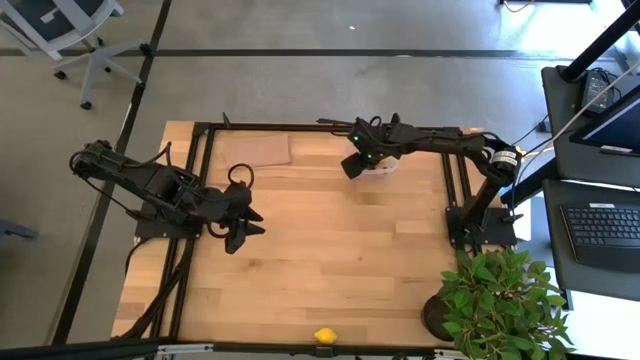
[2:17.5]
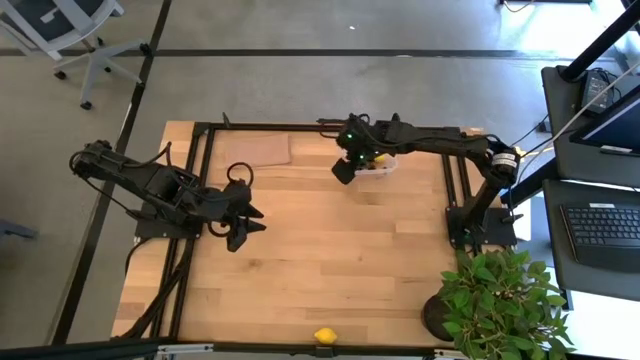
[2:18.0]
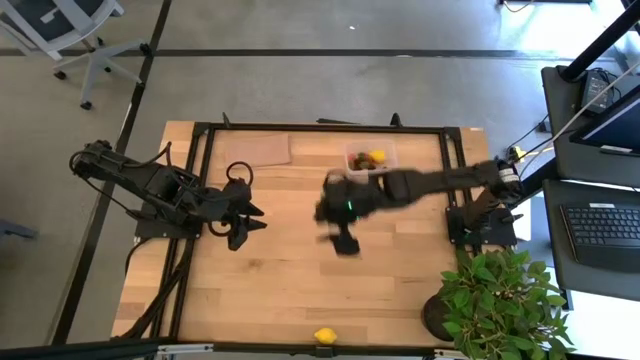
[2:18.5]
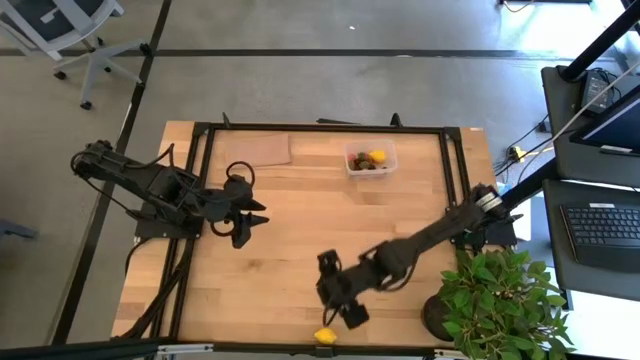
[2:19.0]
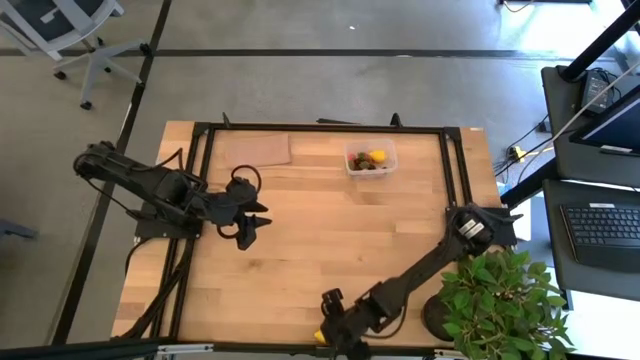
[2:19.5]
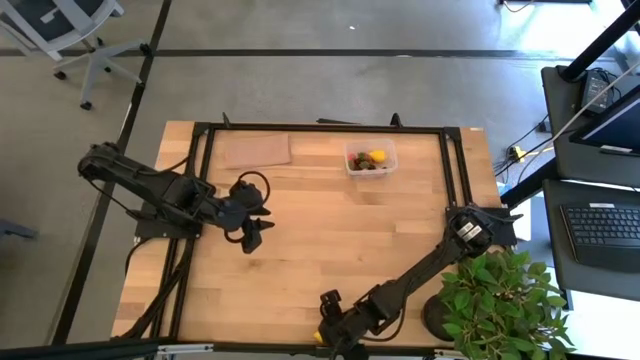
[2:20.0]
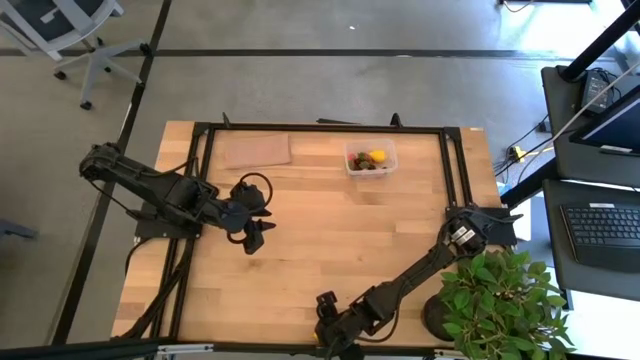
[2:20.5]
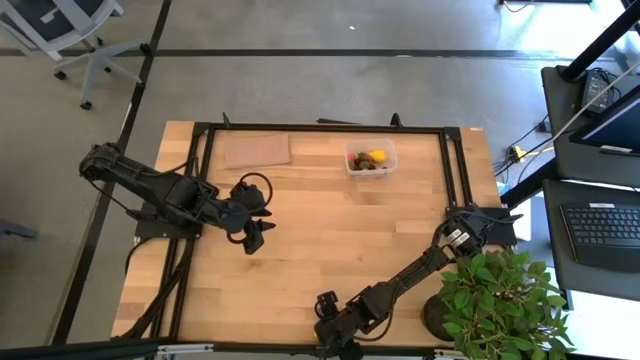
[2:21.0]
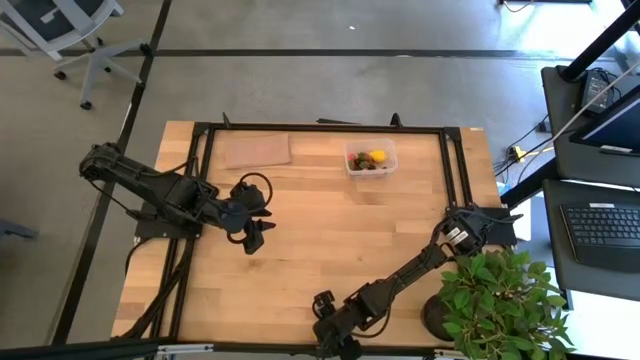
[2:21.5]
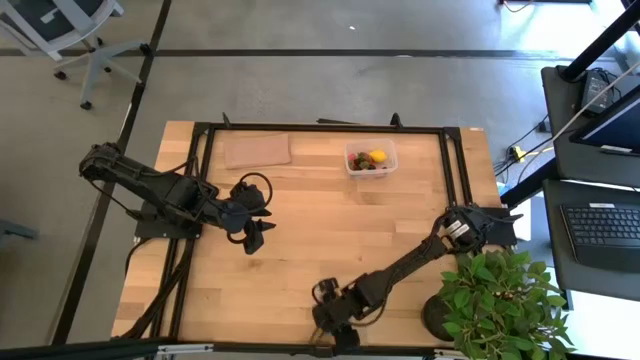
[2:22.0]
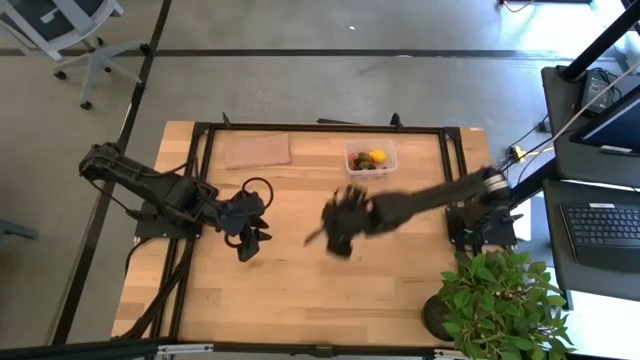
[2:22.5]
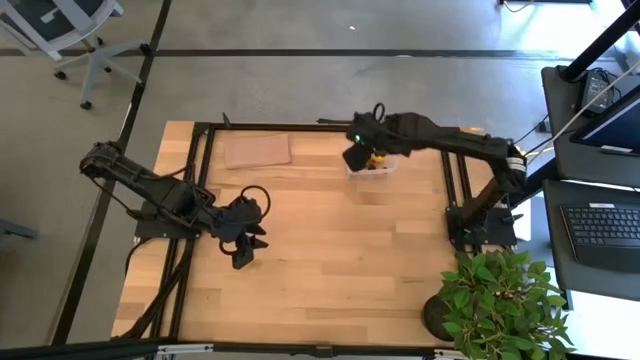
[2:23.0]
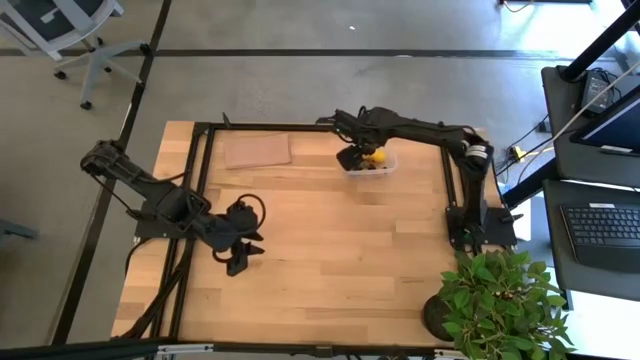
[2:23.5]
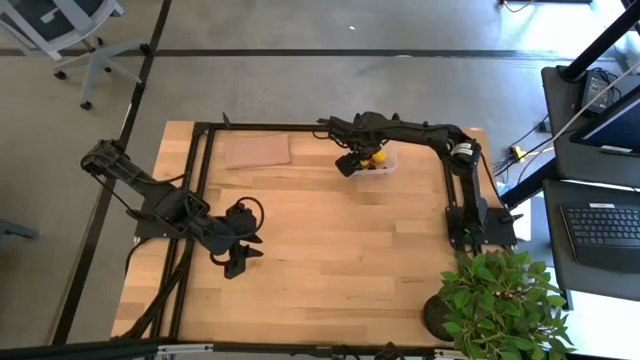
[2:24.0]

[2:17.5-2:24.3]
Task: Pick and placing Produce into tupperware
Put the lemon into the transparent bin

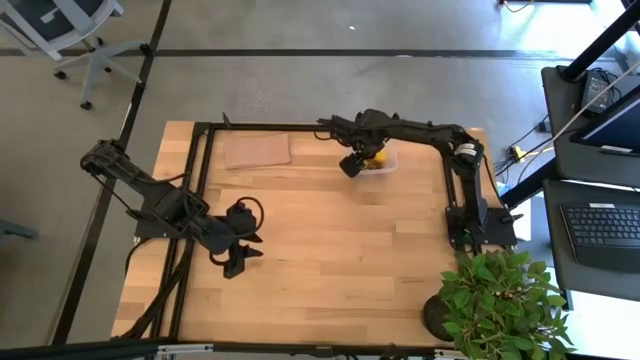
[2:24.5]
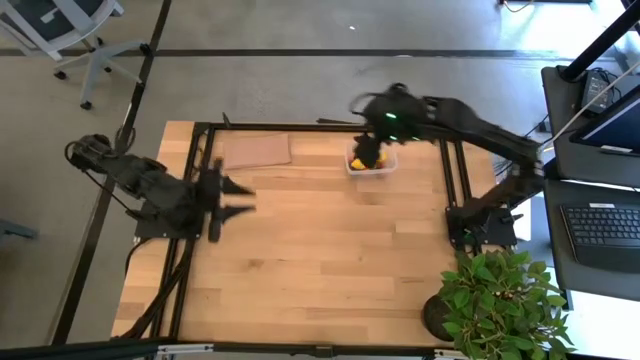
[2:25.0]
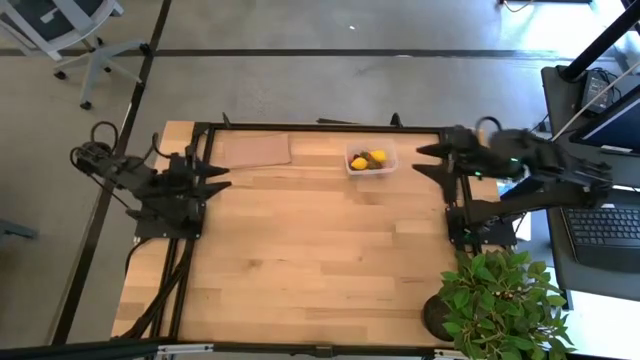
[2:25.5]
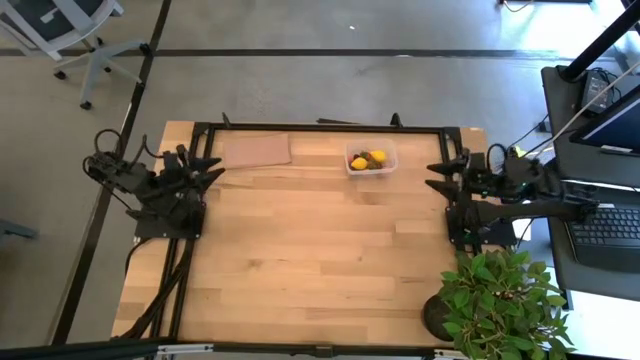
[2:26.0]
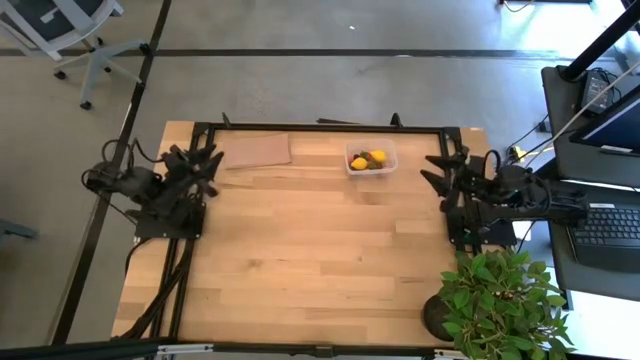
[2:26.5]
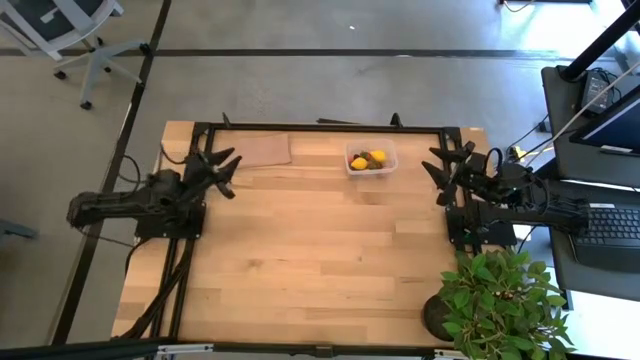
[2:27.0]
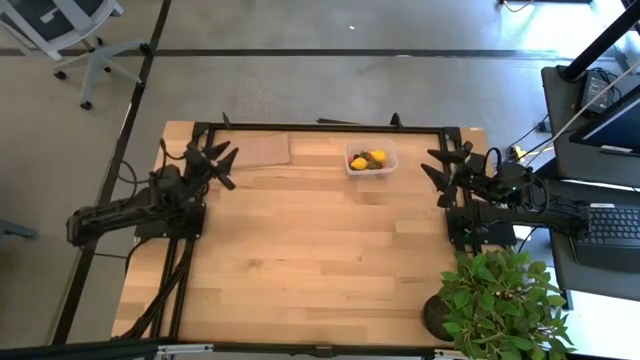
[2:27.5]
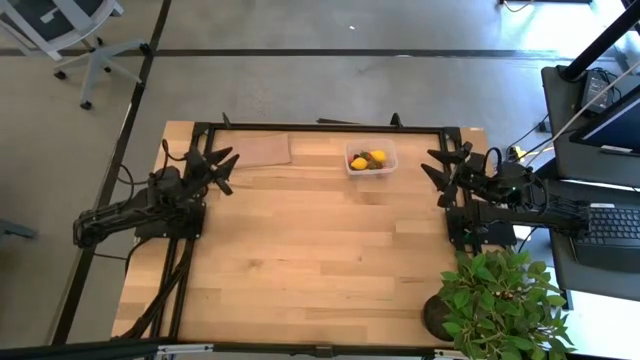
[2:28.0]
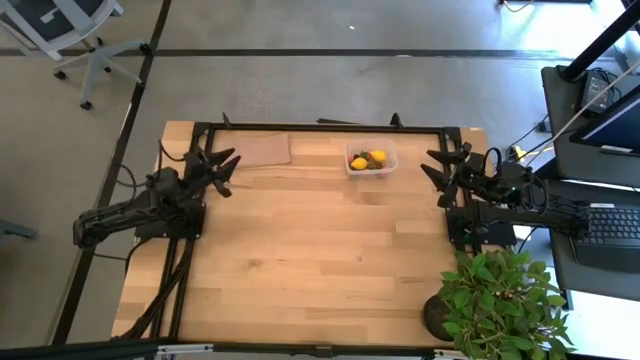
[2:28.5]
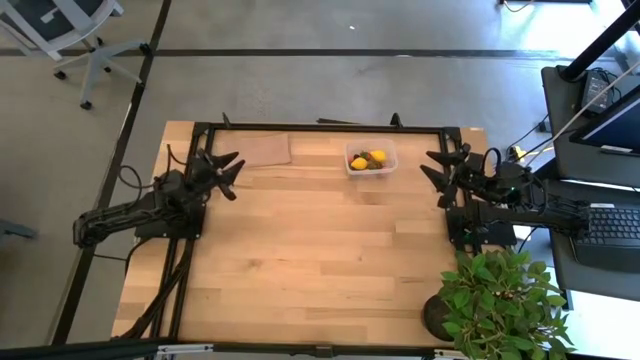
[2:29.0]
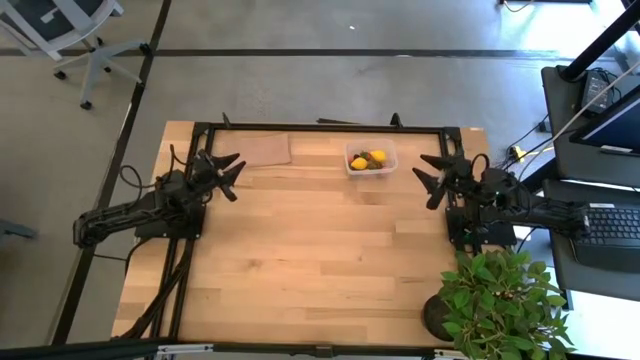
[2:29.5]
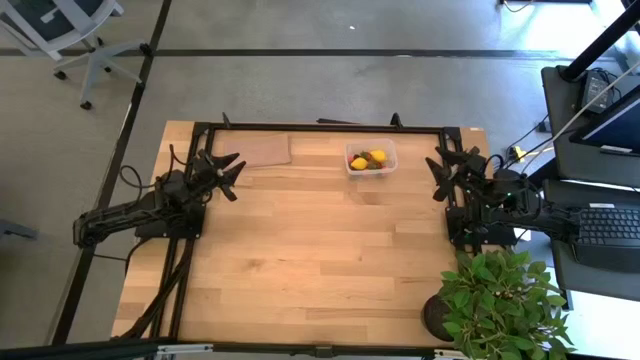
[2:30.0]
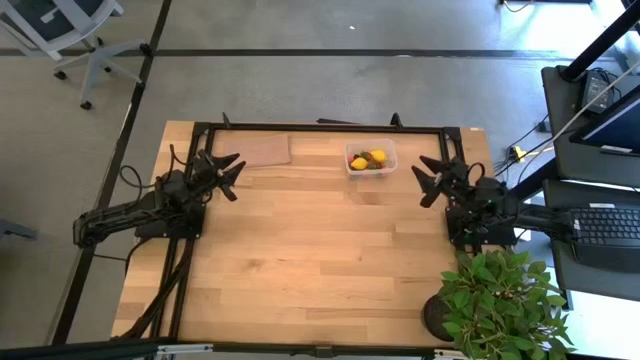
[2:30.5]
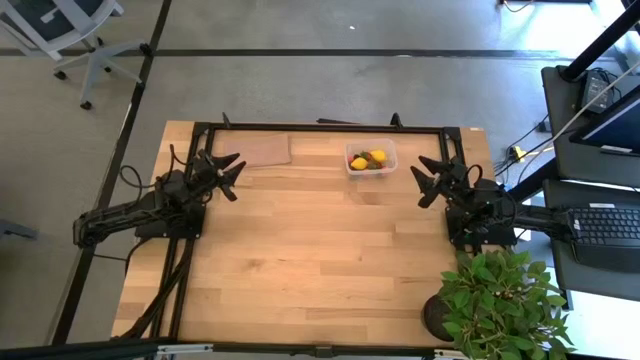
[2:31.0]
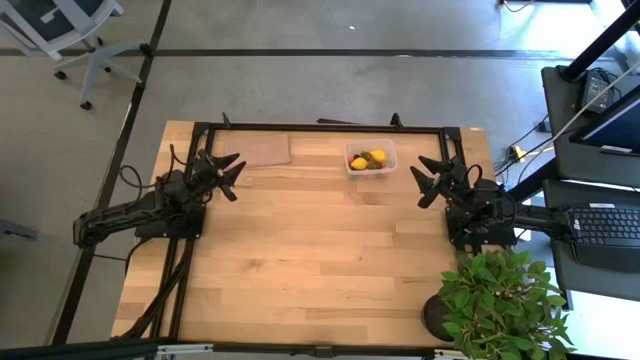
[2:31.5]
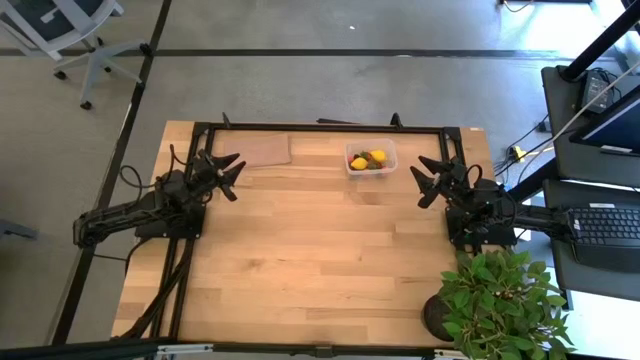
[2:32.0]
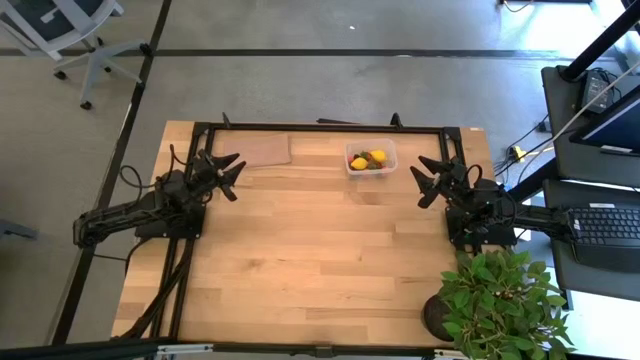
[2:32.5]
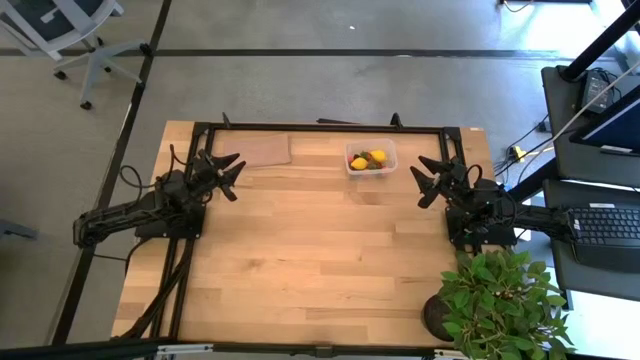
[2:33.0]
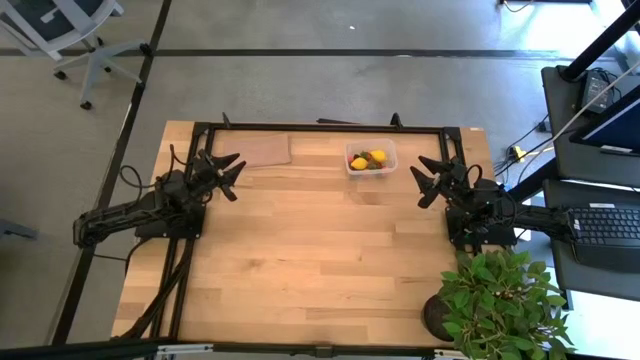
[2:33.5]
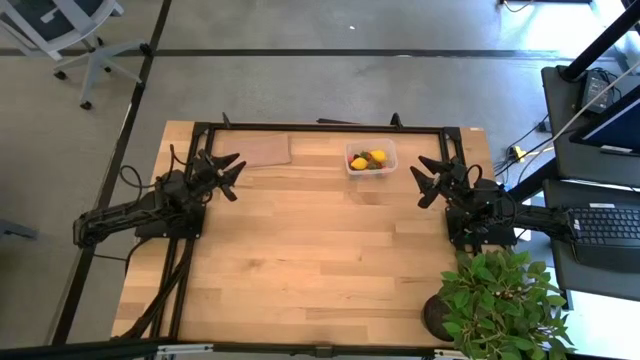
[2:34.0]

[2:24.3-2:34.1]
Return to Home Position

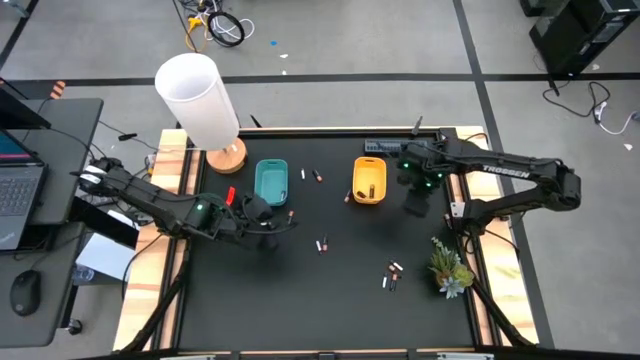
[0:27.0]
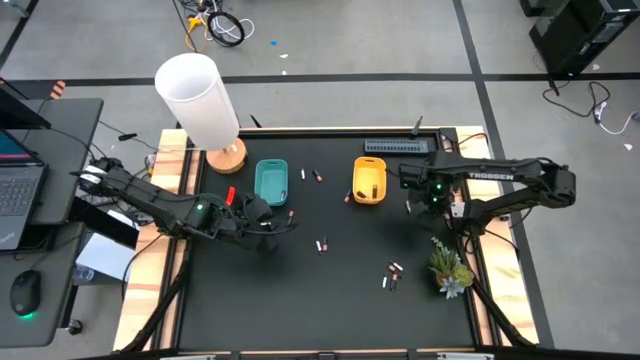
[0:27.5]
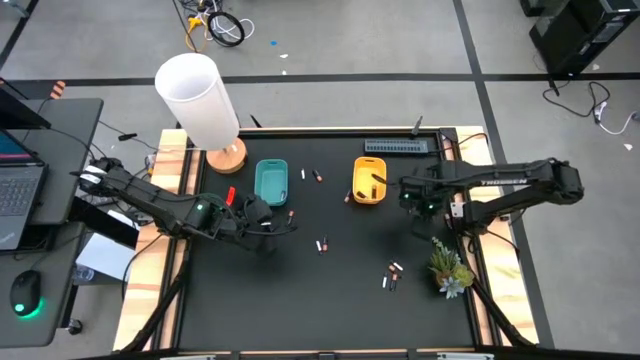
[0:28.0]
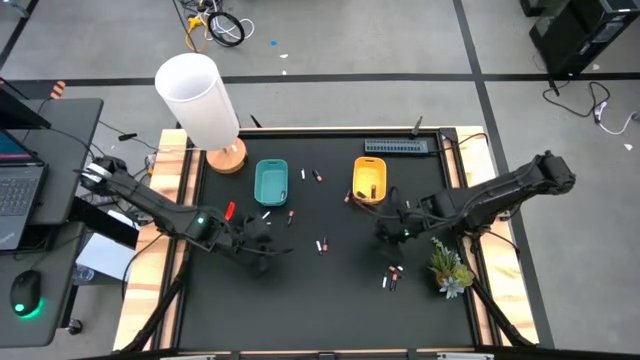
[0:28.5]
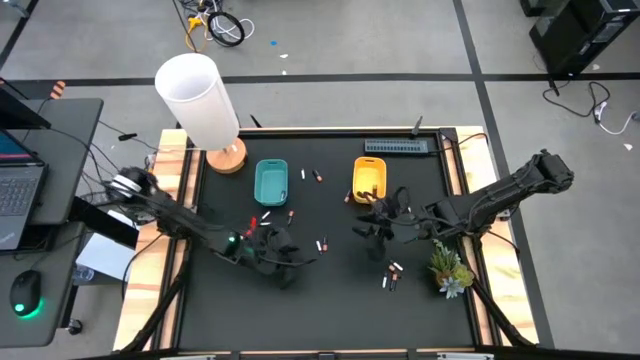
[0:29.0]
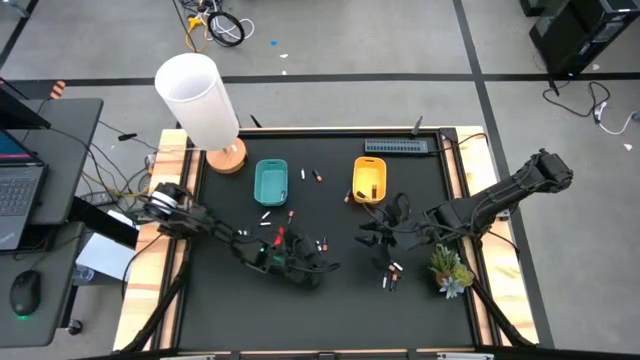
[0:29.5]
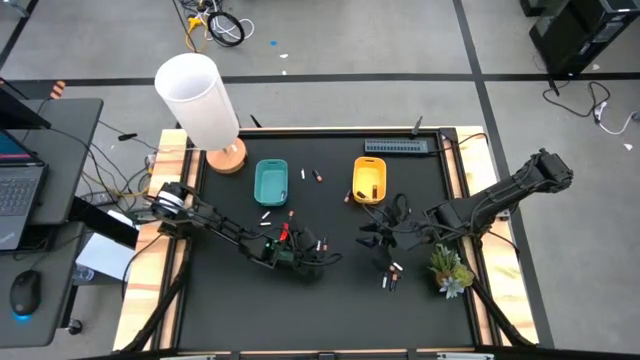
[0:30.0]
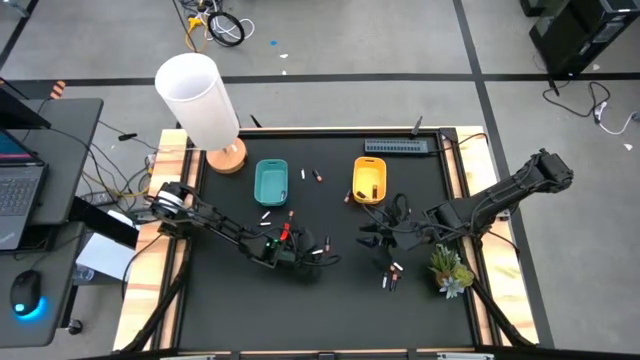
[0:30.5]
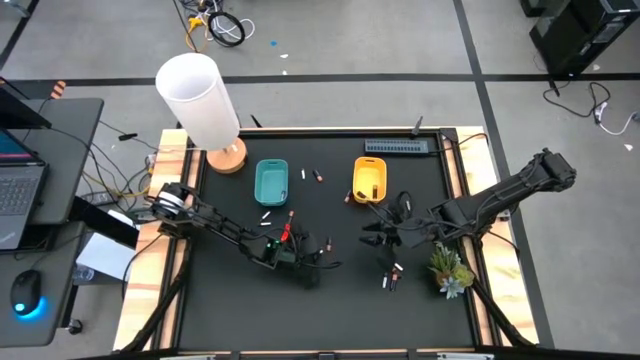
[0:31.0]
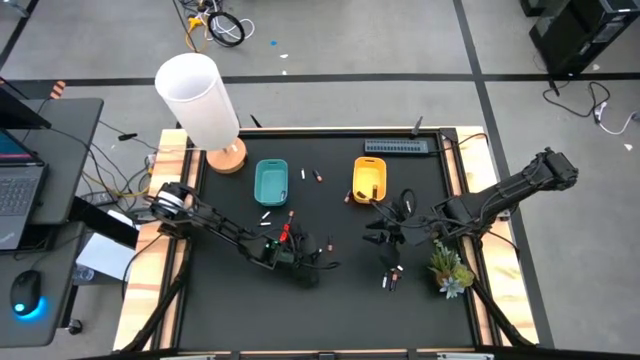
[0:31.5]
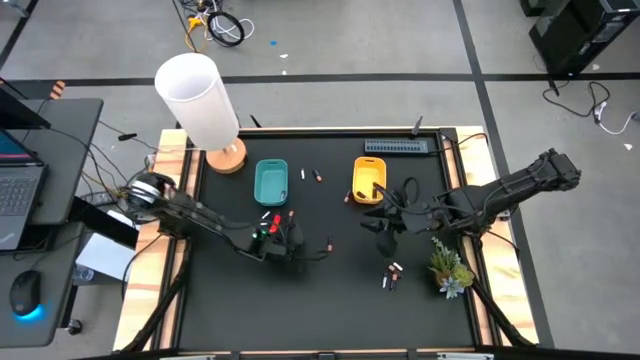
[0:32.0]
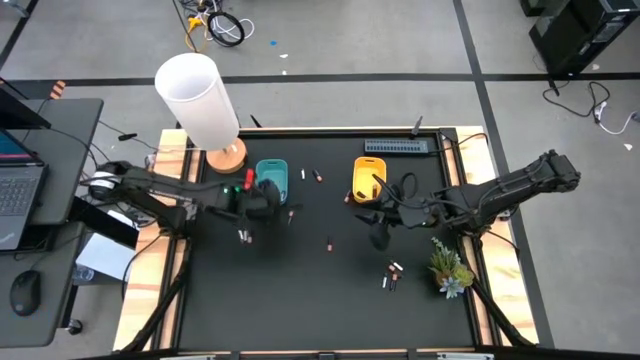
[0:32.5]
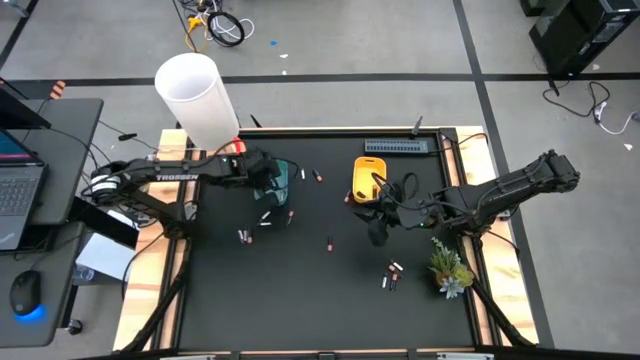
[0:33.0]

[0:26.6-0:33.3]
Task: Sort batteries
Put the silver battery into the blue bin
